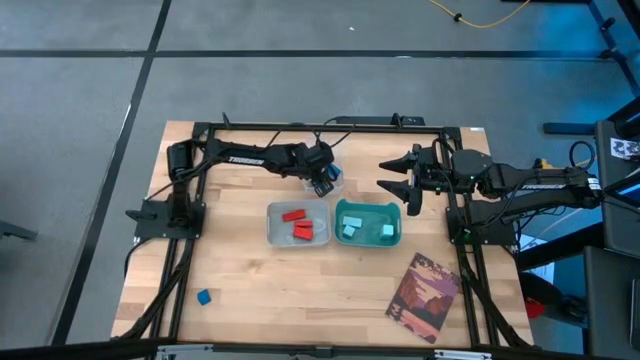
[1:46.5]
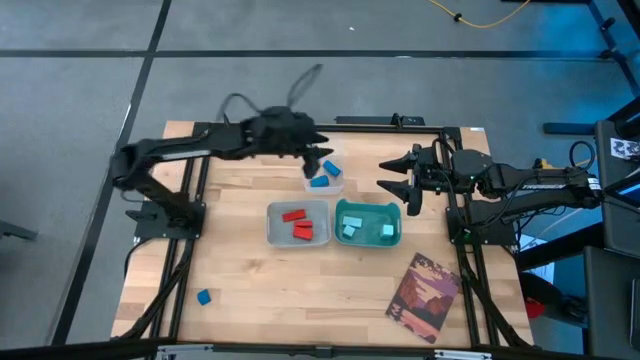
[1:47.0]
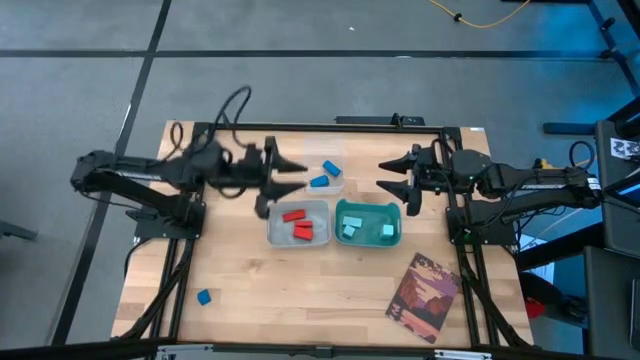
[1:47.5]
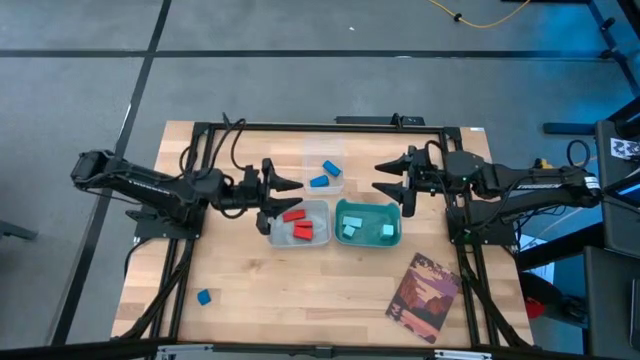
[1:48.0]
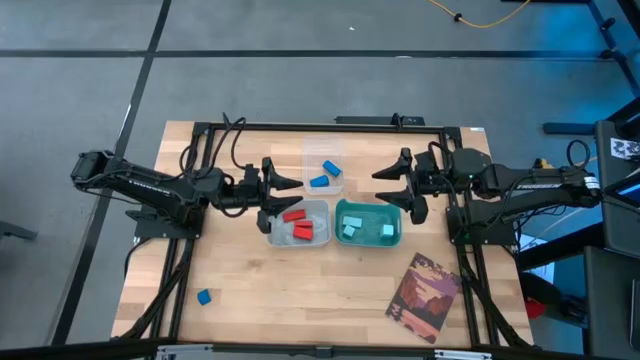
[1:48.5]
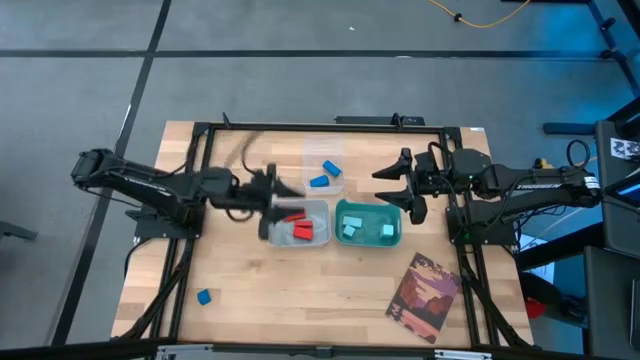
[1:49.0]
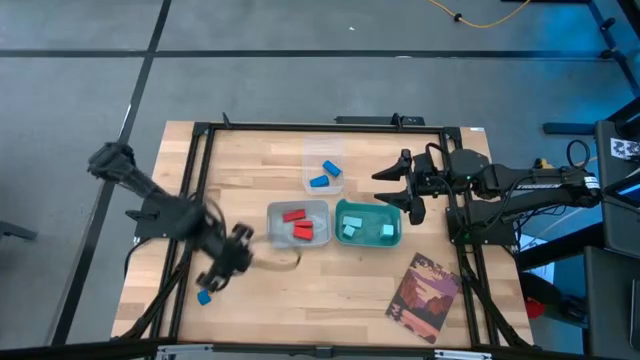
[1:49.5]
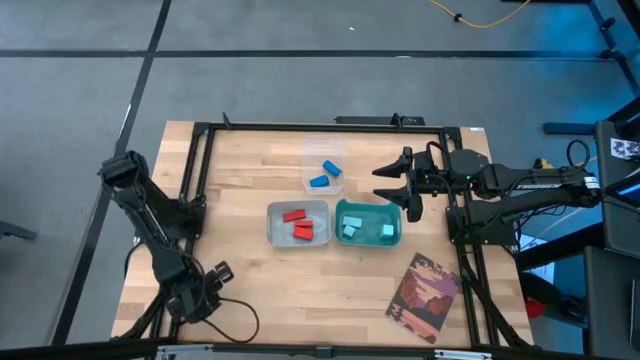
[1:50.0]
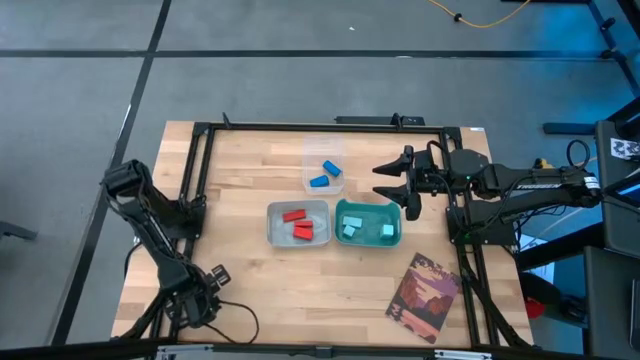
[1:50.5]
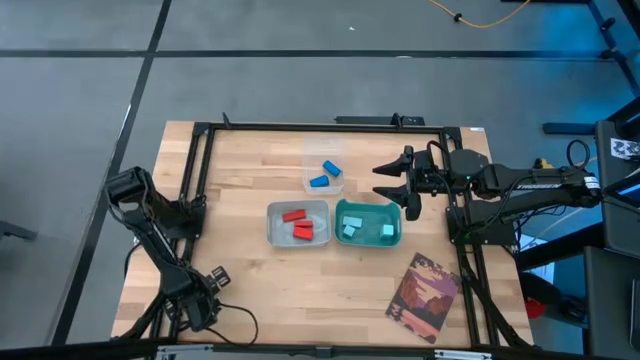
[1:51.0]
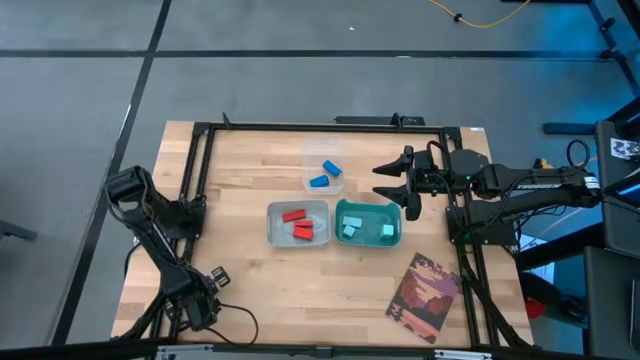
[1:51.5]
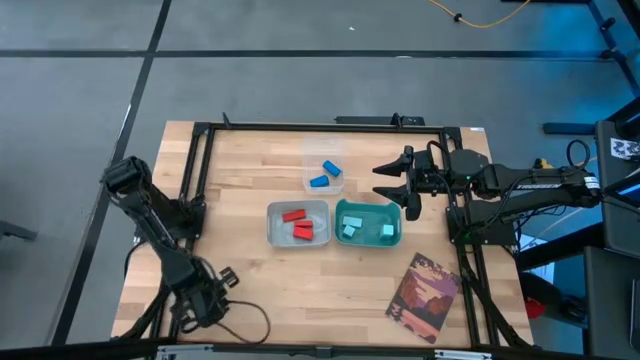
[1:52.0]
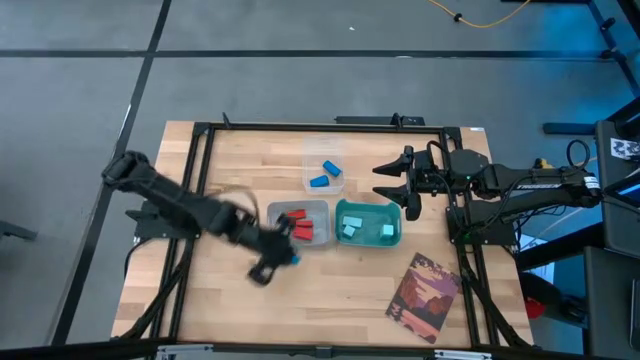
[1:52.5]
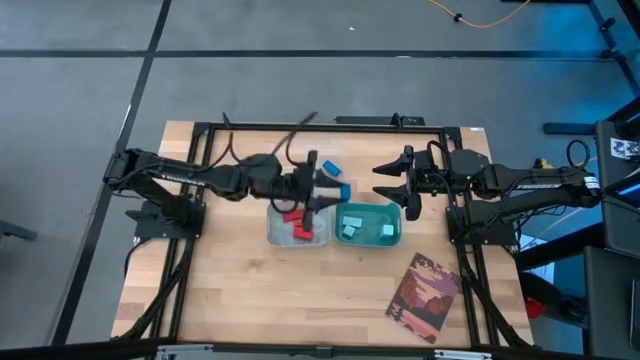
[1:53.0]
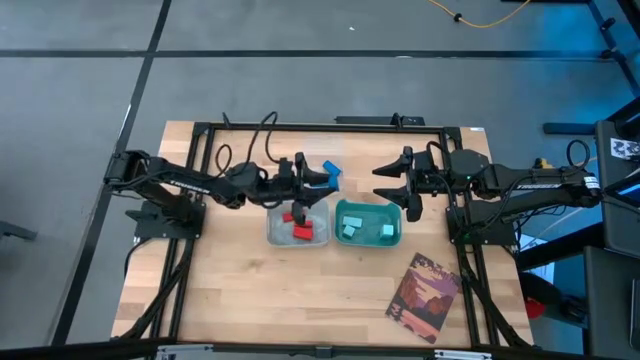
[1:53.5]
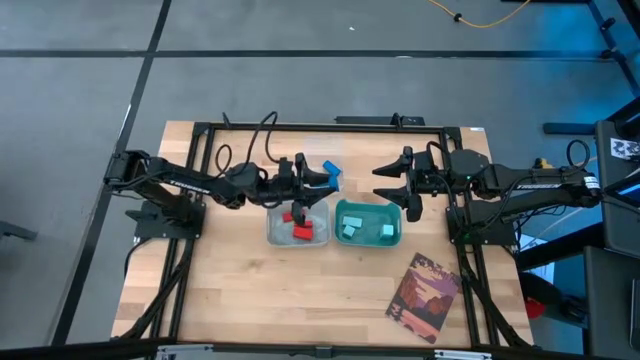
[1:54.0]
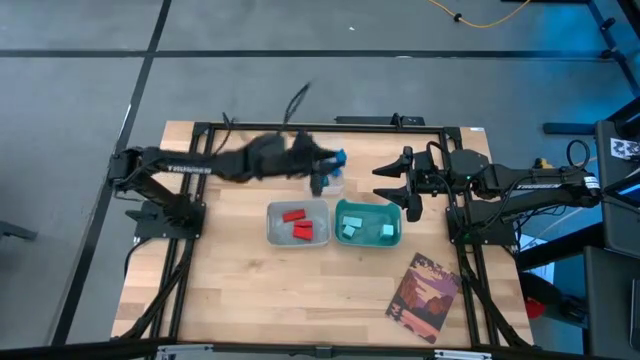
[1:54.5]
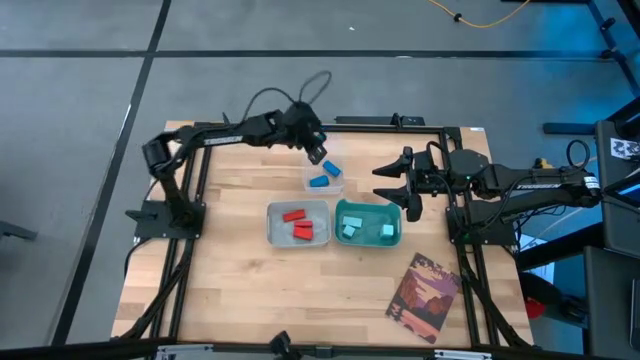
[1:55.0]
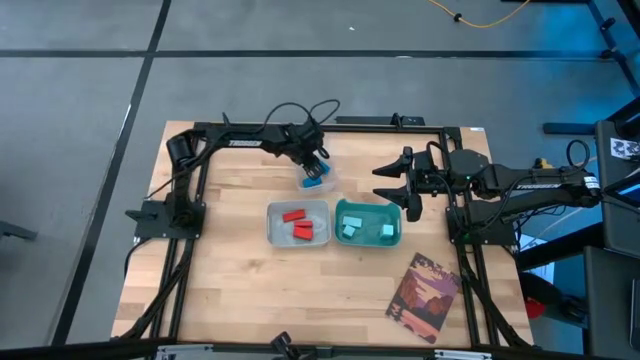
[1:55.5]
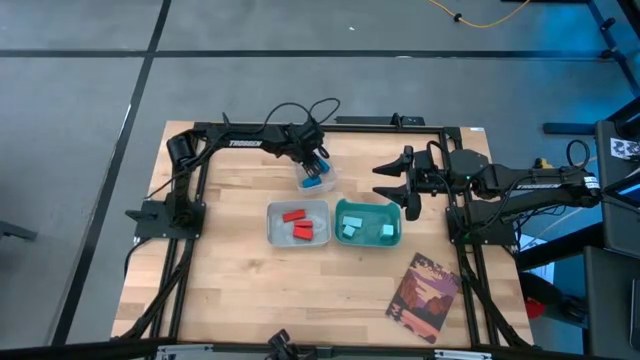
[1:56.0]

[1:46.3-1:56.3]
Task: Sort & place blocks by color
Put the blue block into the transparent bin

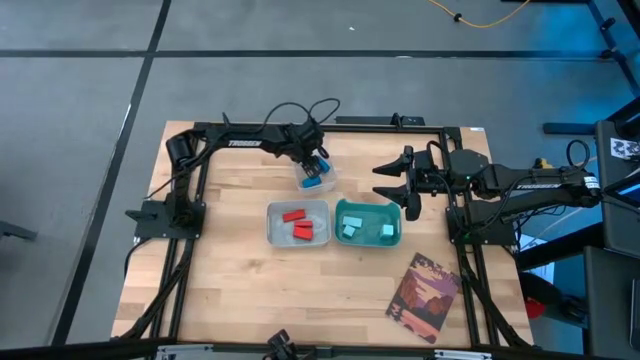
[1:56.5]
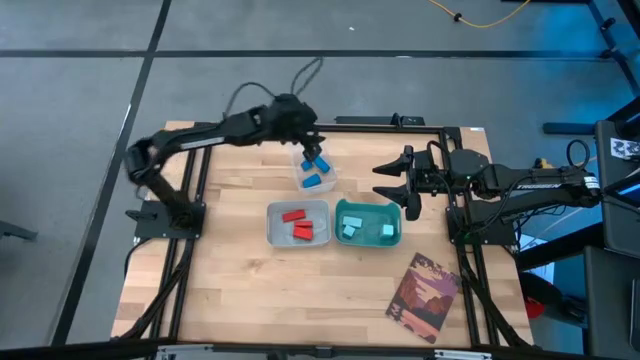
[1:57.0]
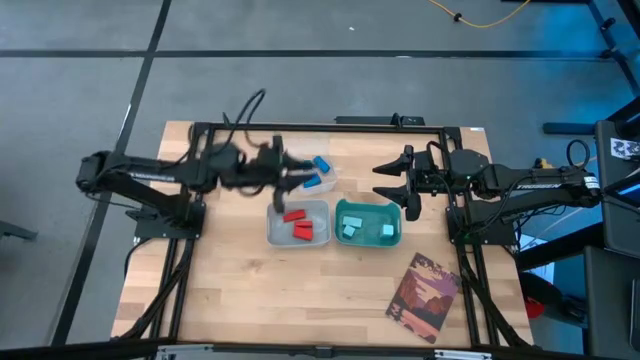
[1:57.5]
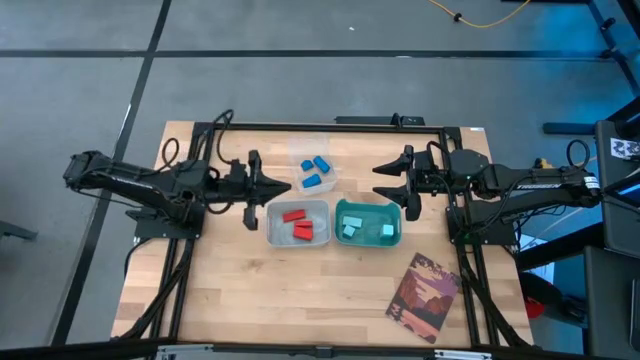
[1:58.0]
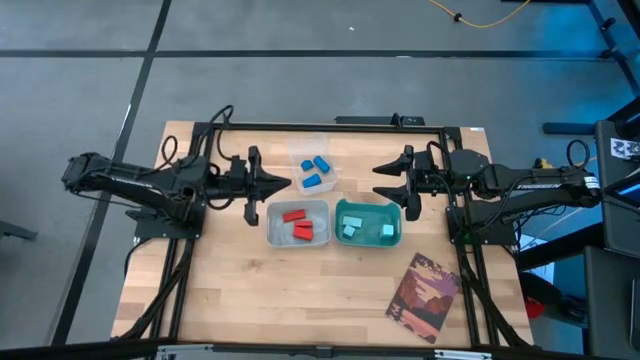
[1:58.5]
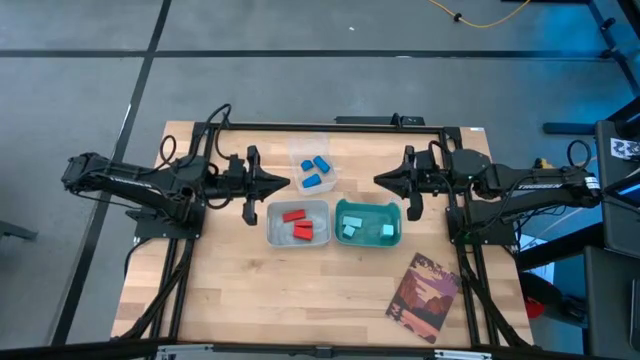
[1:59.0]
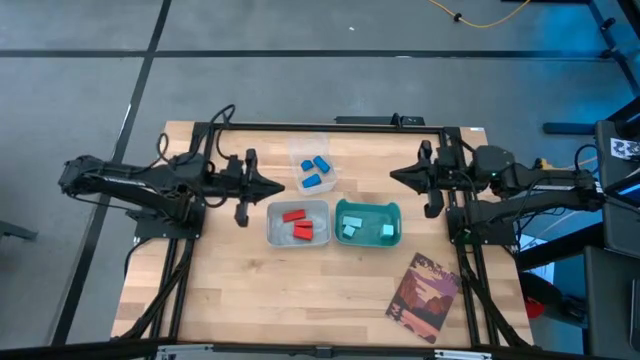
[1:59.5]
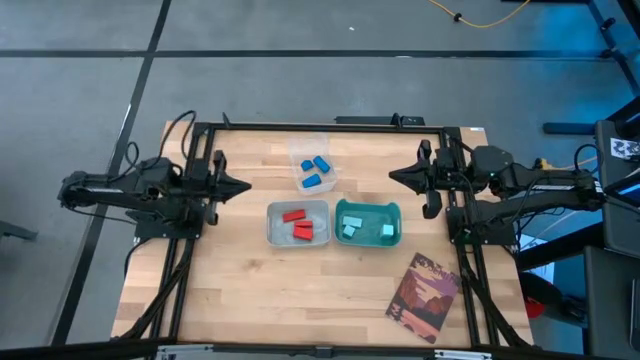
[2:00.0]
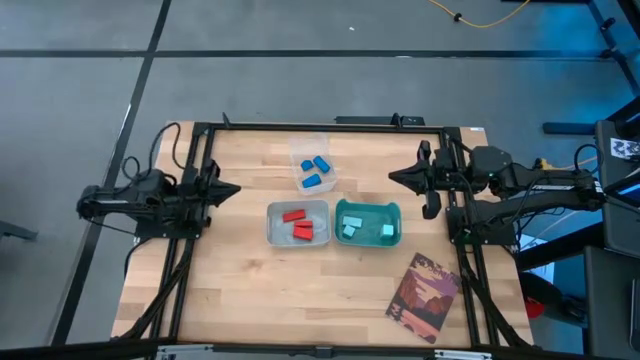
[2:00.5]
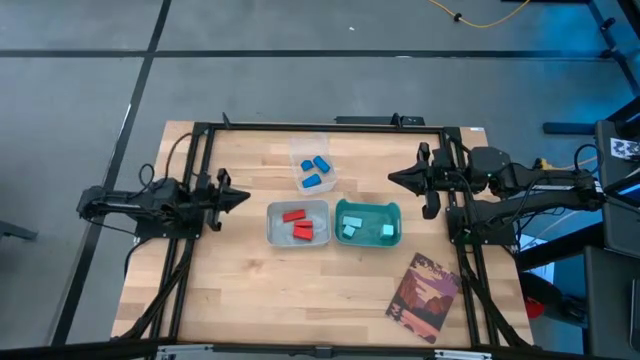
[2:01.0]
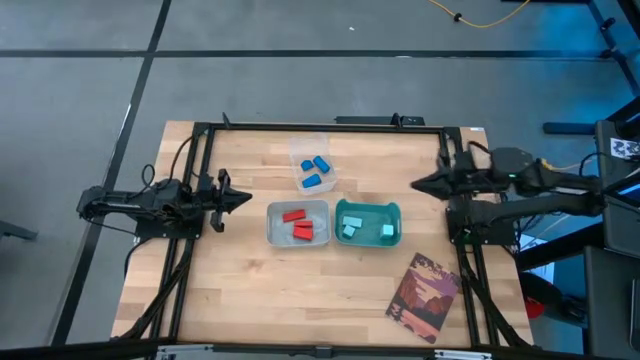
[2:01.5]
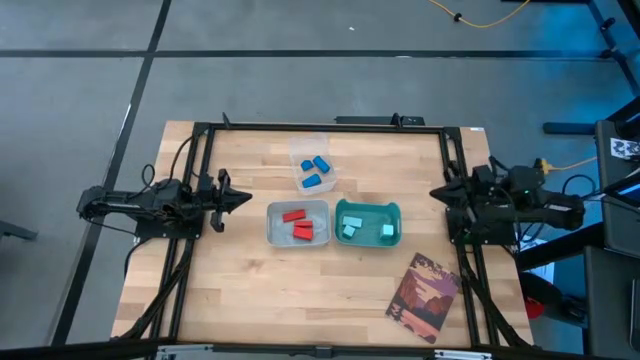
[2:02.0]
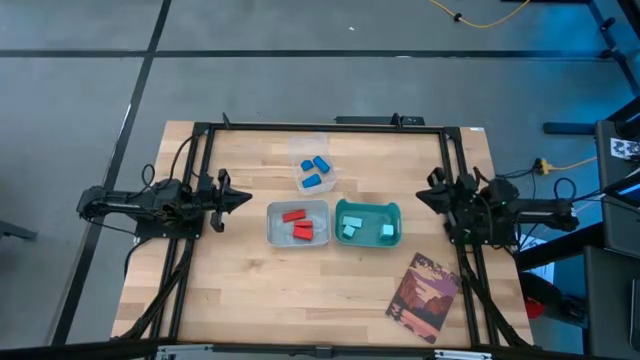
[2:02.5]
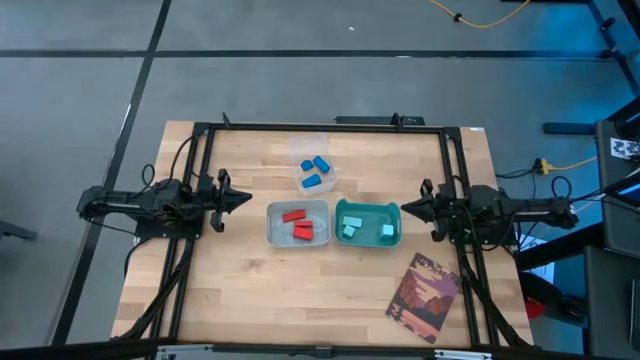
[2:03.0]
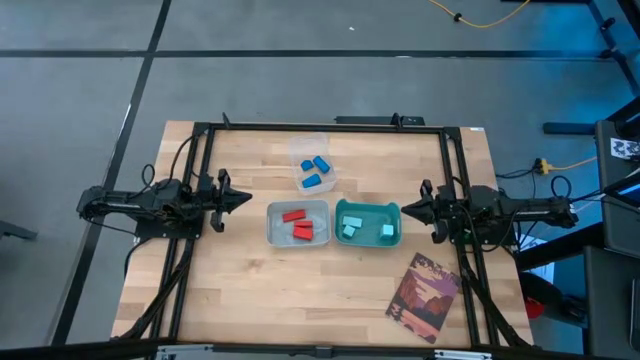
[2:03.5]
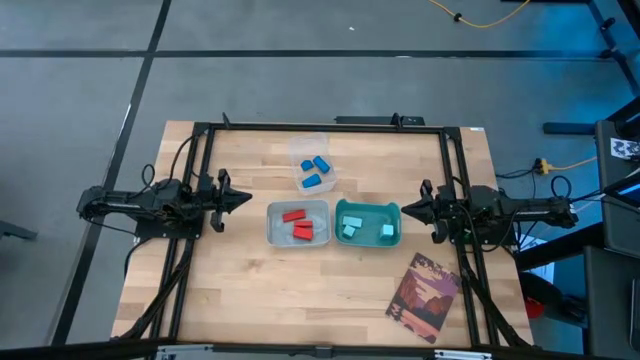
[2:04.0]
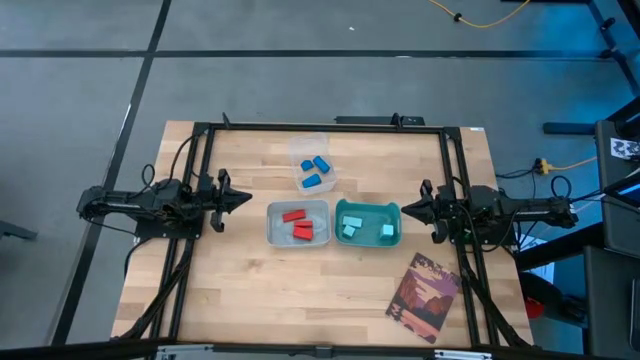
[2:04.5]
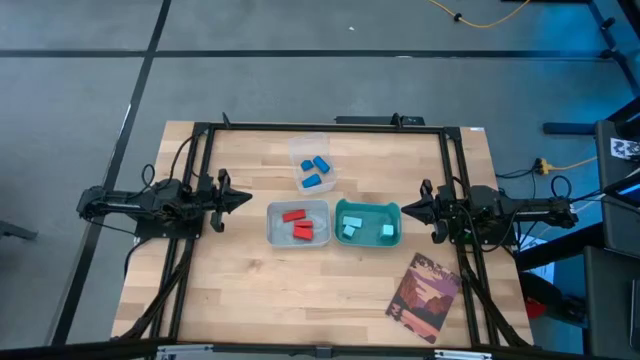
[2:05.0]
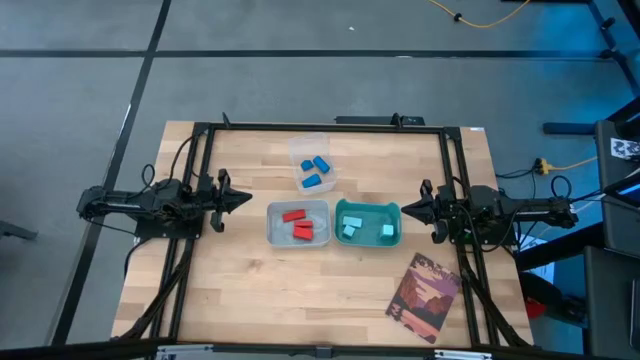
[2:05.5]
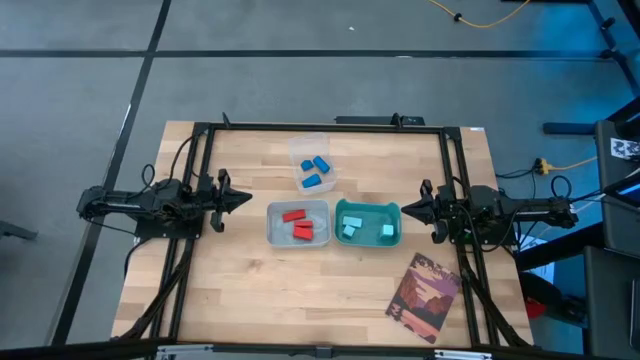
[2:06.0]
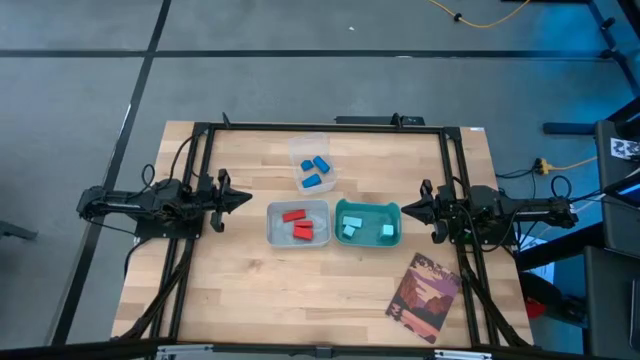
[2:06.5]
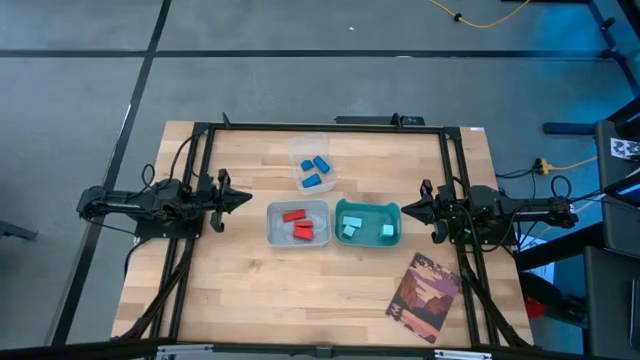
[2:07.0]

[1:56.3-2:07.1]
Return to Home Position
